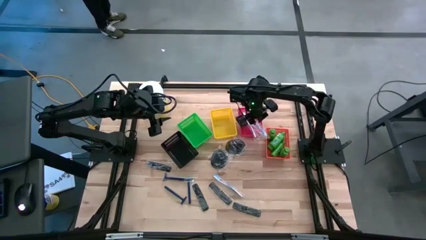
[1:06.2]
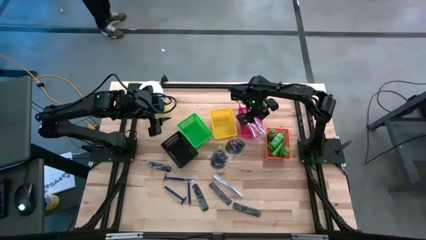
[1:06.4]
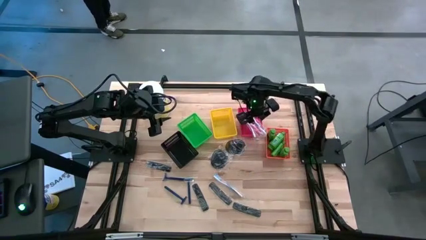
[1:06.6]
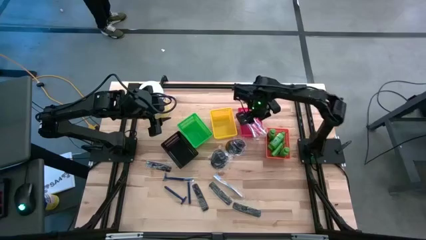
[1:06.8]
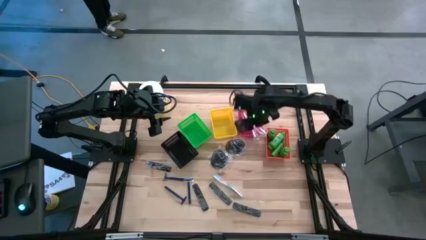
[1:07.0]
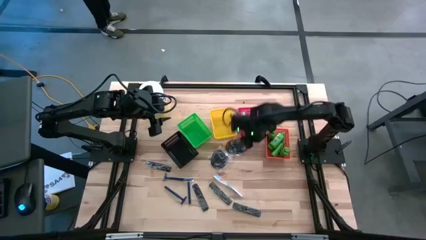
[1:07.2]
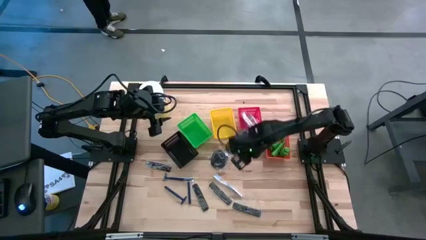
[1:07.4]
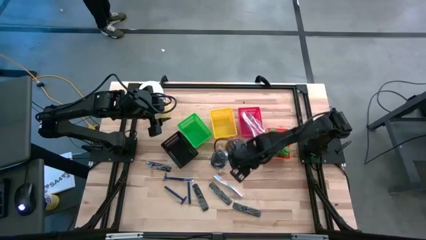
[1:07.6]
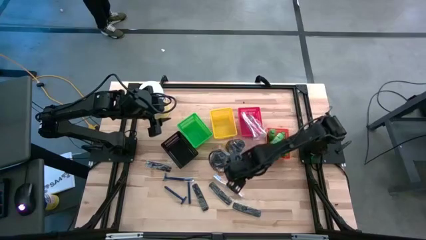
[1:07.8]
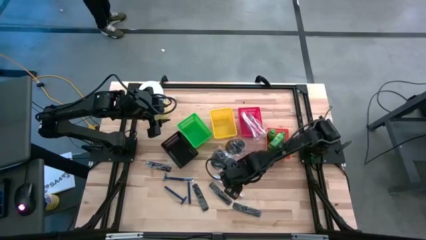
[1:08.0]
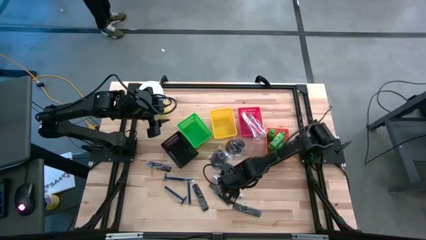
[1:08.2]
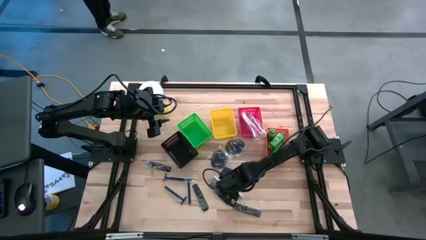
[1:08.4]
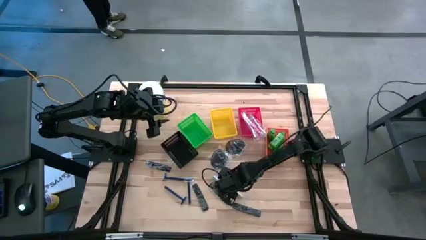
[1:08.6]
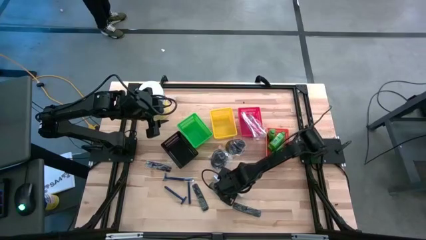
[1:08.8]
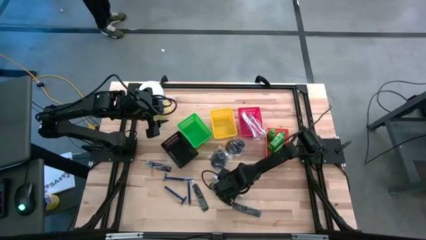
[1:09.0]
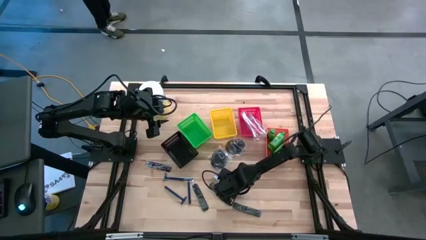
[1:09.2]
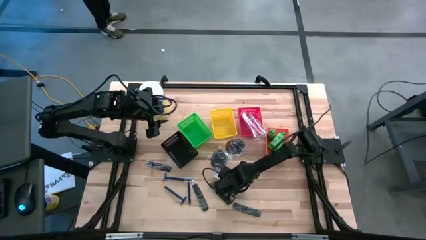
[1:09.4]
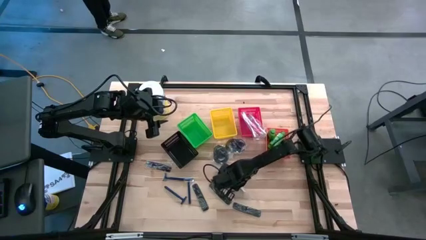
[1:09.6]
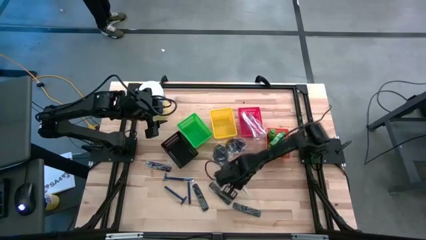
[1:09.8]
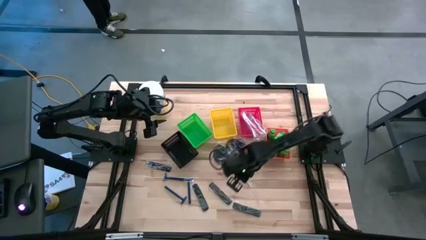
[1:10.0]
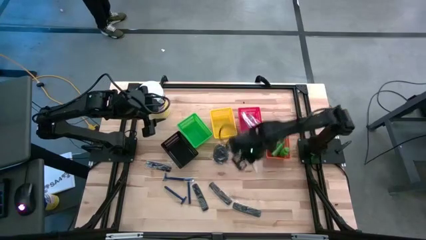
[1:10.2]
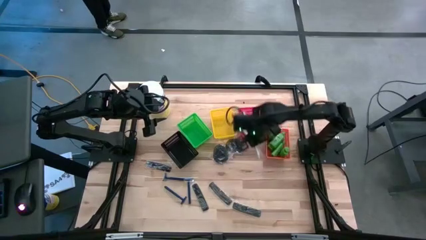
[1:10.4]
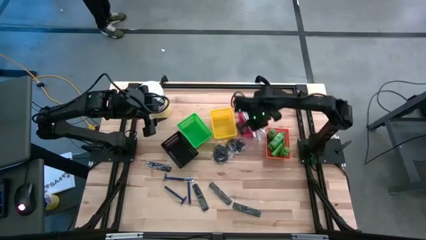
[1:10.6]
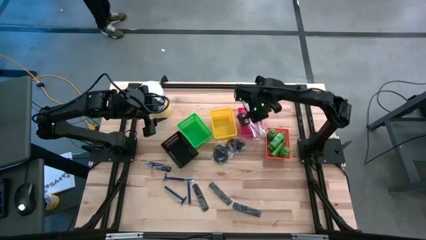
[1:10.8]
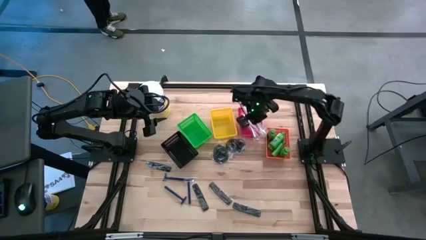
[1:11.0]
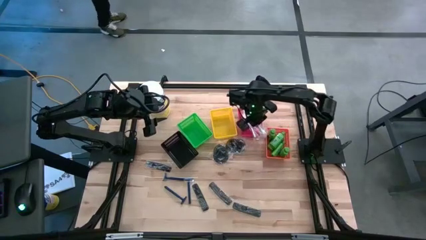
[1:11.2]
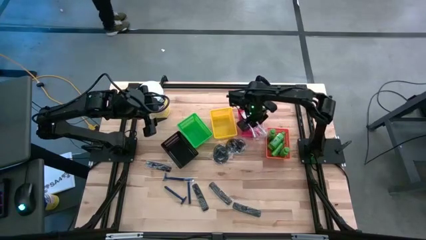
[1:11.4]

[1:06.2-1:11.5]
Task: Pick & Place Travel size toiletries
Put the blue toothbrush into the red bin

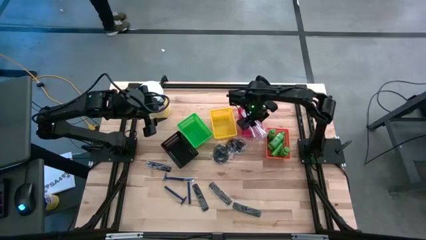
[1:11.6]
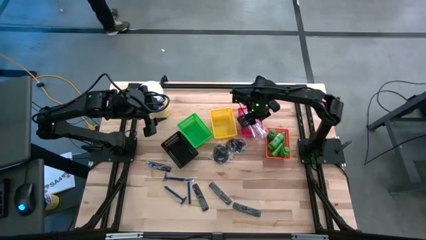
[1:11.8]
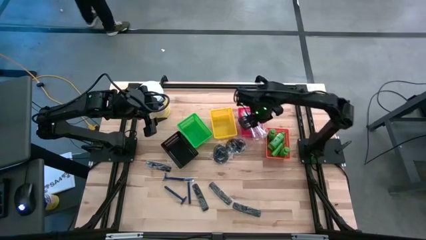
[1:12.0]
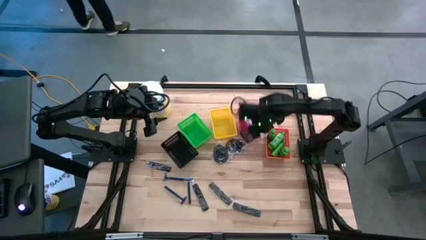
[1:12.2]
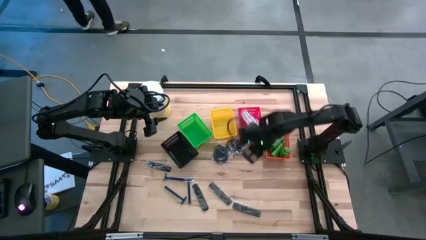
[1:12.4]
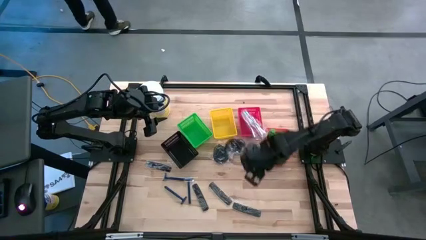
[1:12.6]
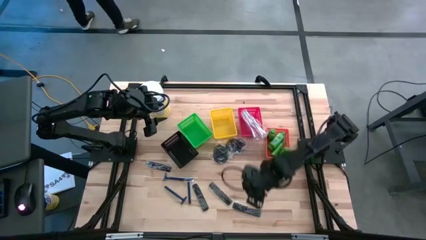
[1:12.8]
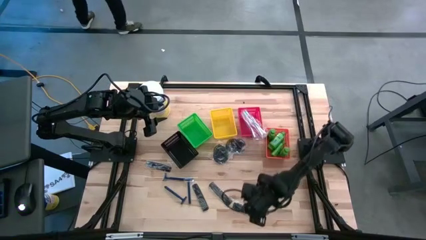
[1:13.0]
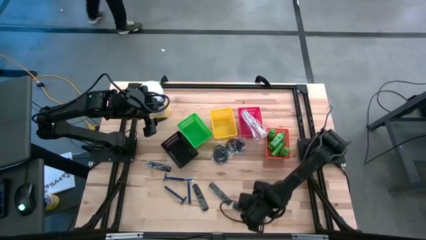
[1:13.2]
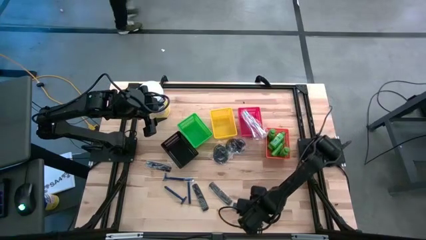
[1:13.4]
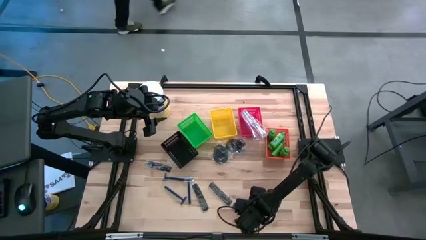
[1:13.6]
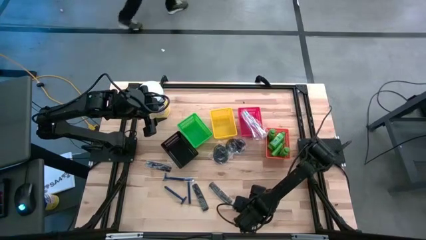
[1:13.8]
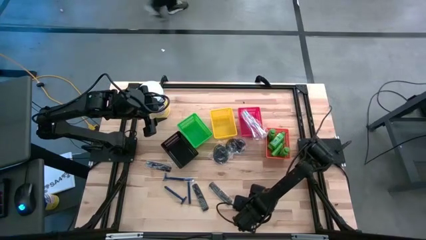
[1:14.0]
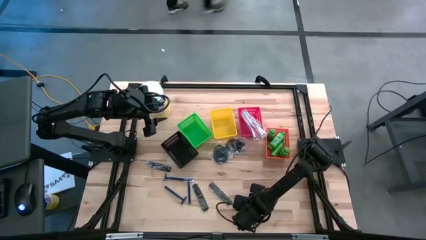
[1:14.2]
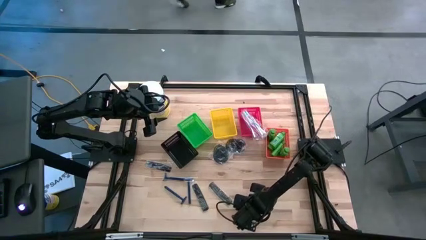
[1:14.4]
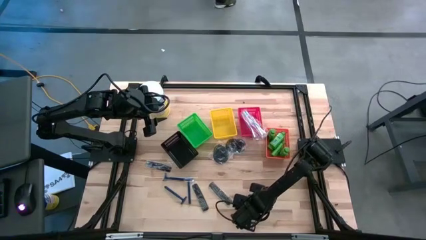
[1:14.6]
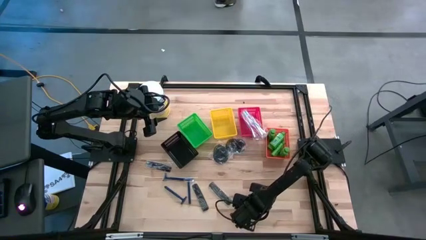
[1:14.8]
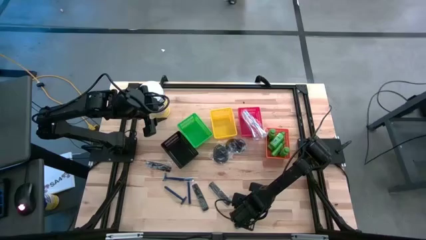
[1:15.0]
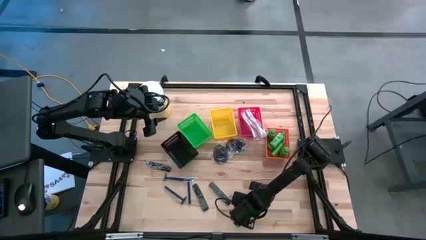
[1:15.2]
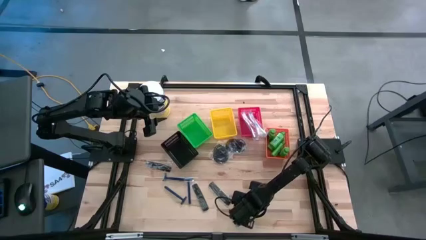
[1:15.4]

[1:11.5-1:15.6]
Put the black hair comb into the yellow bin

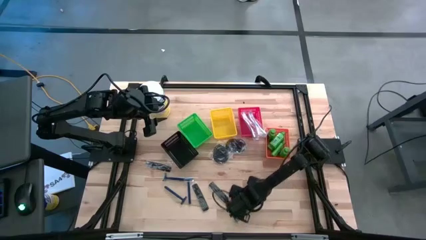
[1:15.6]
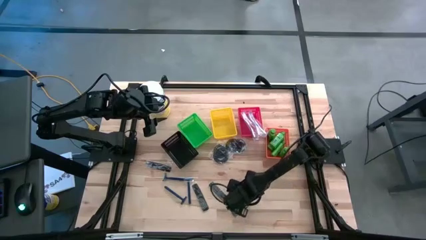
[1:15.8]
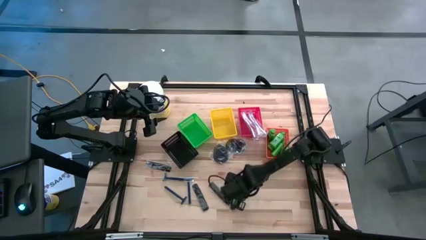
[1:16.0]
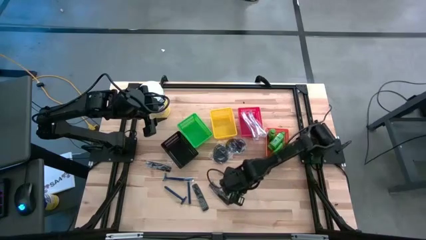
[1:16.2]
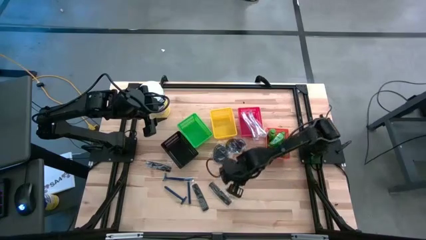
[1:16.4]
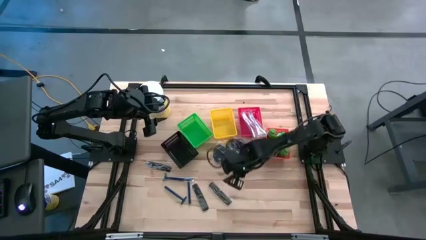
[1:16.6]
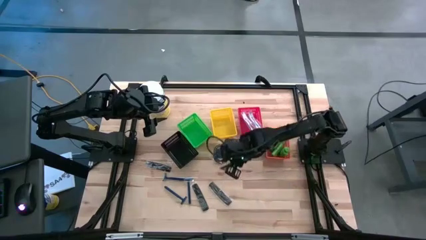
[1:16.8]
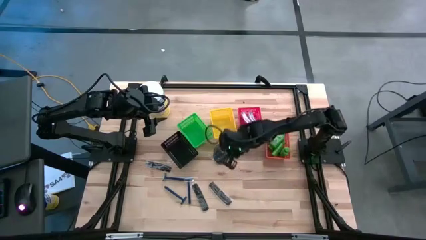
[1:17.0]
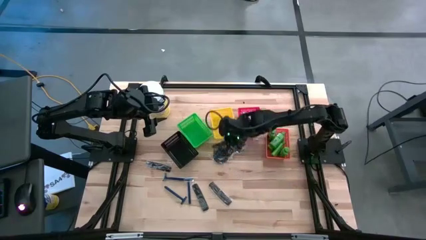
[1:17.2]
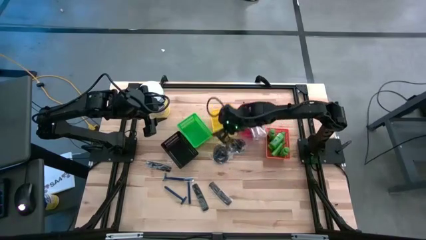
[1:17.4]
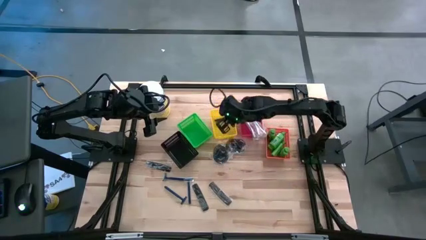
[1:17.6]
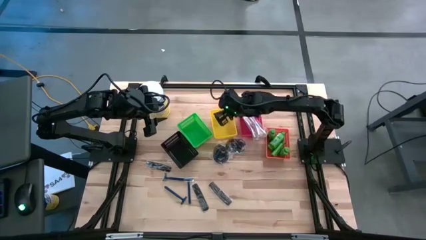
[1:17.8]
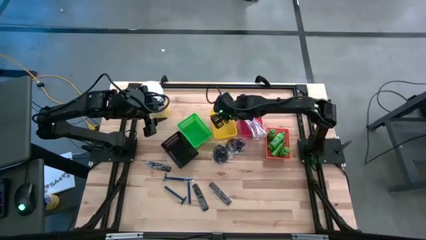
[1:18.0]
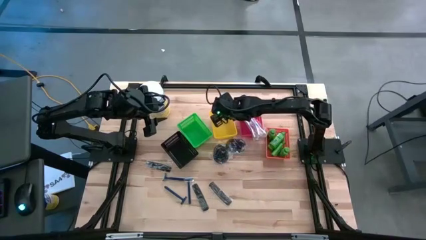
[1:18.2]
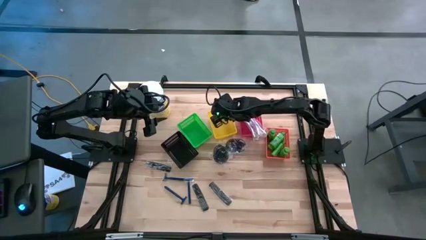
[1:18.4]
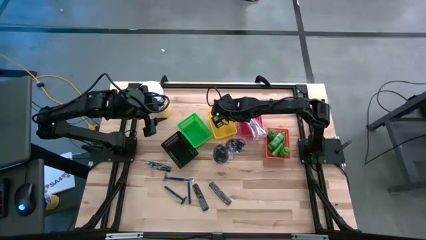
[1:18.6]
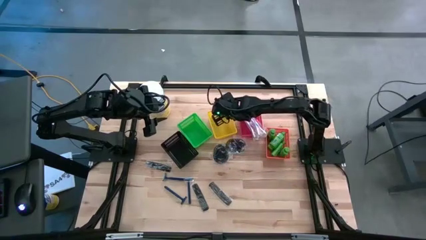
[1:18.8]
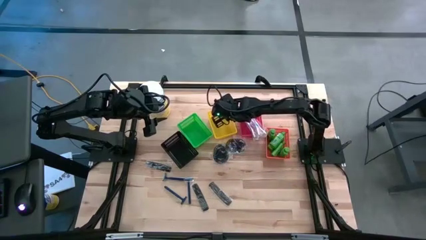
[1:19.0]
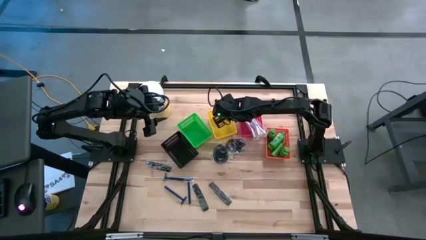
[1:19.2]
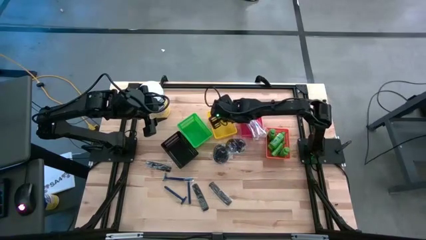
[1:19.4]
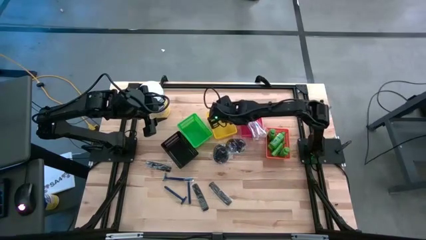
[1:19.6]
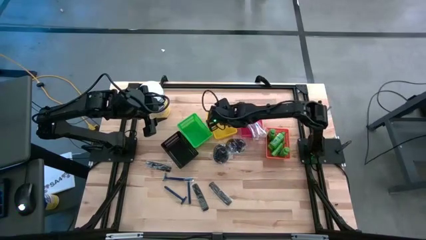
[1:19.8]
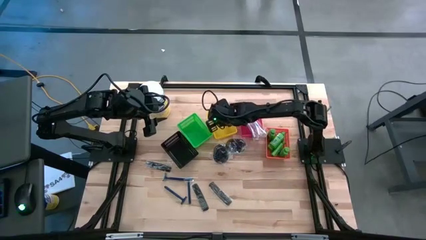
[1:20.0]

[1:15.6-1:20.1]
Put the black hair comb into the yellow bin

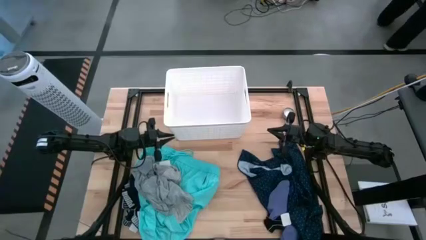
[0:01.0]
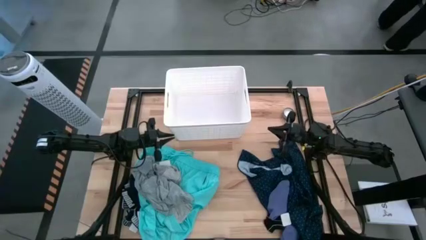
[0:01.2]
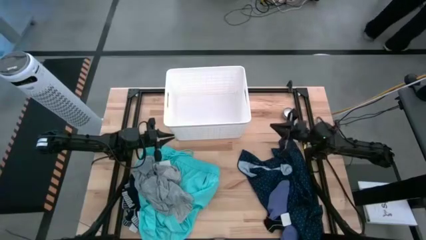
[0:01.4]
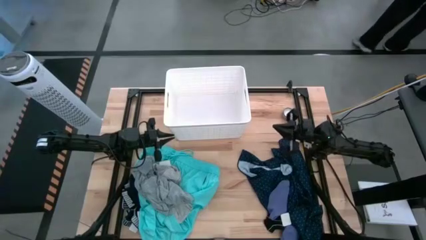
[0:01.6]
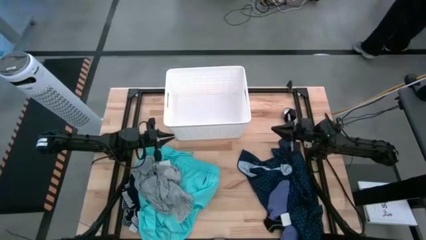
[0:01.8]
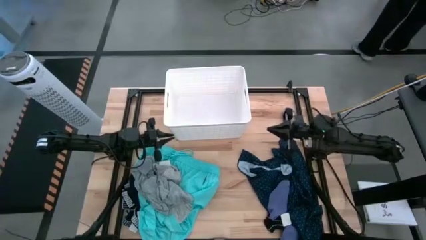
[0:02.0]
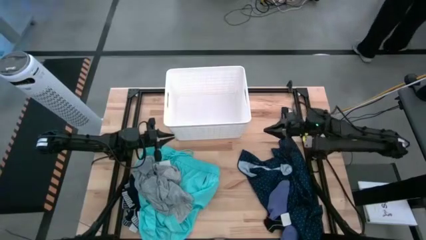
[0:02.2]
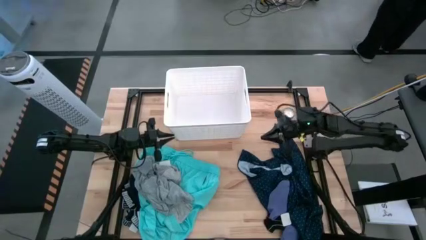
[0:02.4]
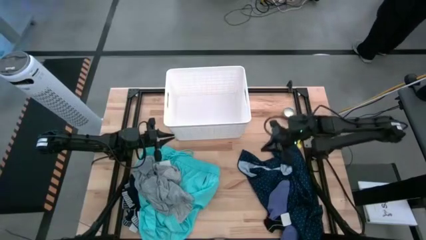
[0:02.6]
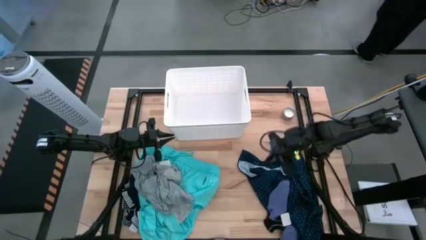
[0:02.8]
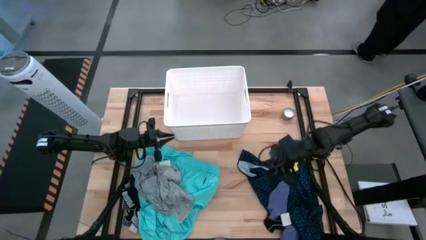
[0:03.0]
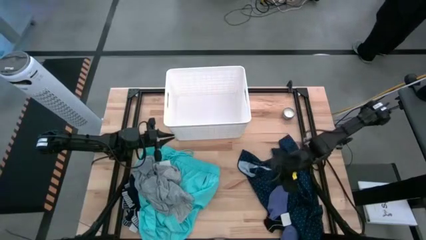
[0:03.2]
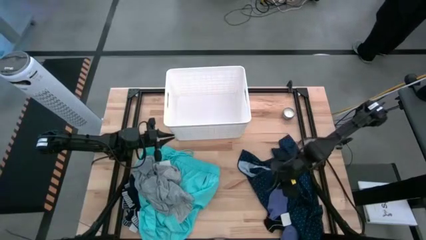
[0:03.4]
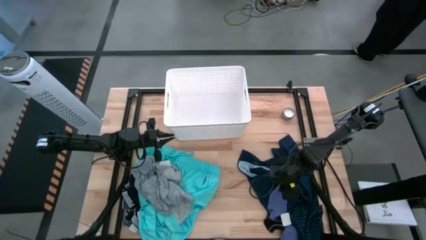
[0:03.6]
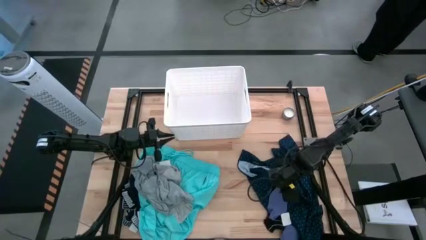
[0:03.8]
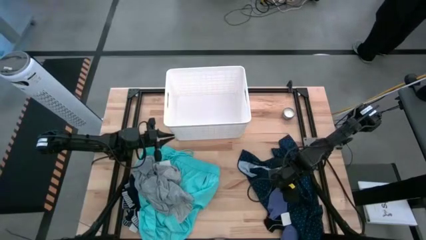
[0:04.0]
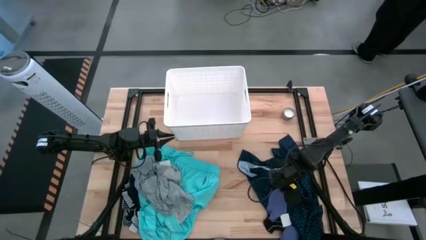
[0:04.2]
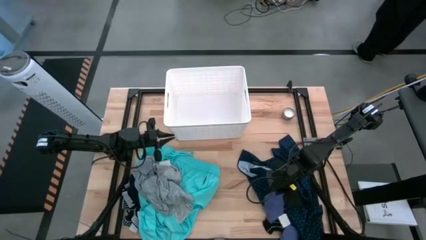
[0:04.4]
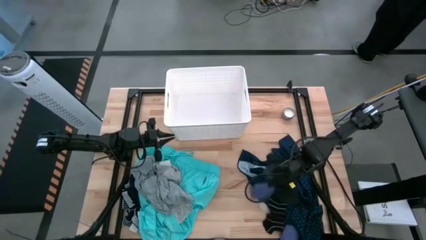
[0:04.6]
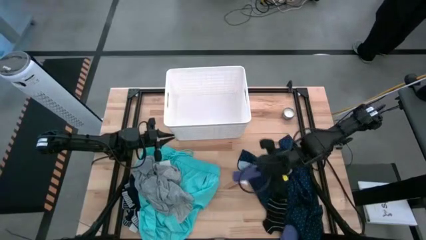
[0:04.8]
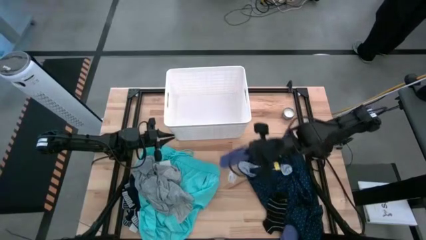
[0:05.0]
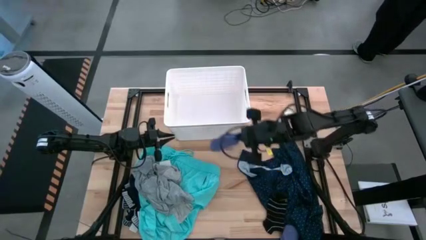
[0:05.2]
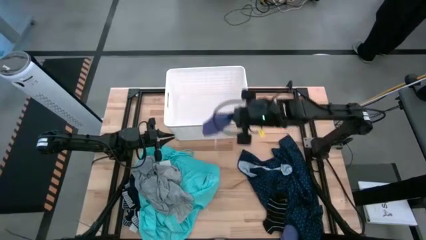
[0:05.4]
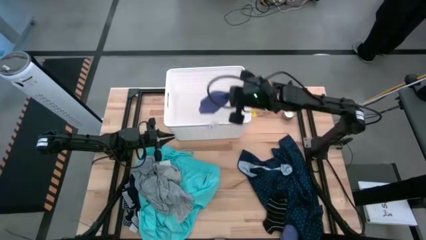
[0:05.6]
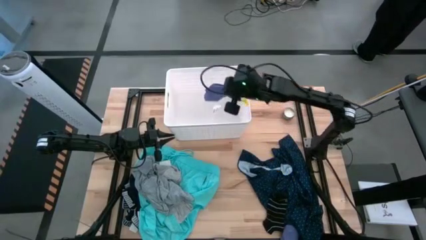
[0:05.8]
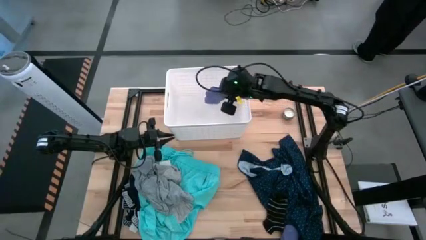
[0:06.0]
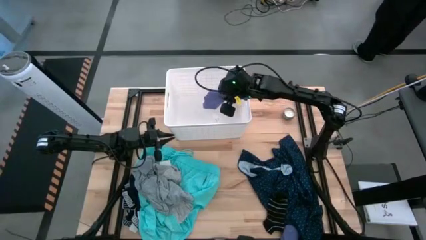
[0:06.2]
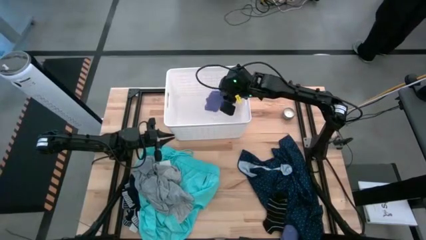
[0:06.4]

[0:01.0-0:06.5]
Task: Sort clothes
Put the top purple sock into the white bin
